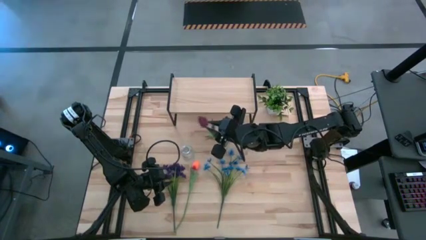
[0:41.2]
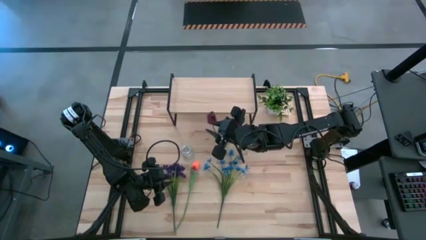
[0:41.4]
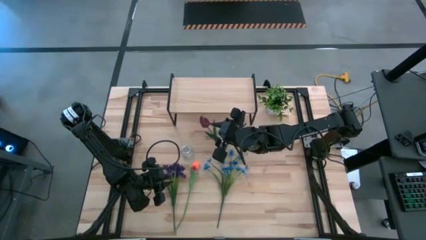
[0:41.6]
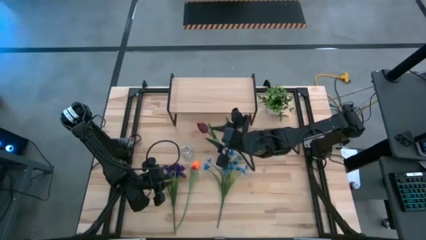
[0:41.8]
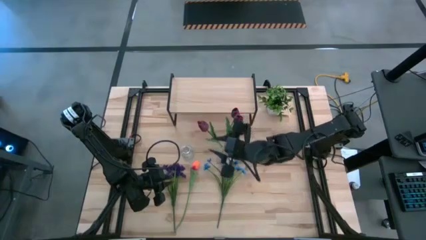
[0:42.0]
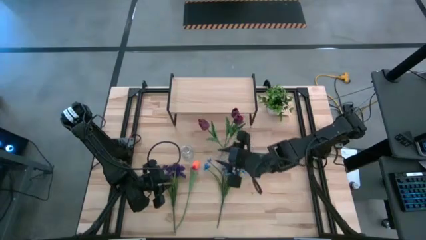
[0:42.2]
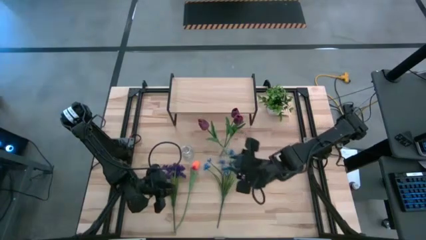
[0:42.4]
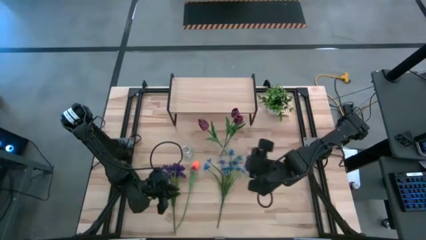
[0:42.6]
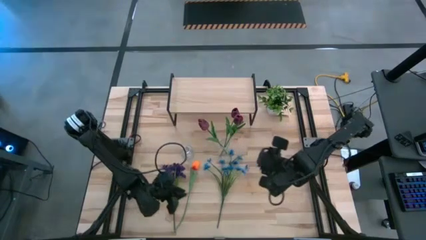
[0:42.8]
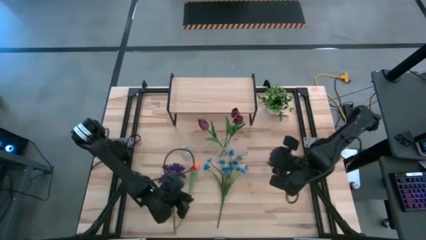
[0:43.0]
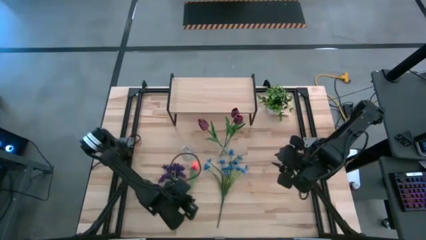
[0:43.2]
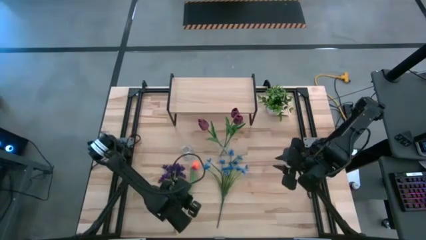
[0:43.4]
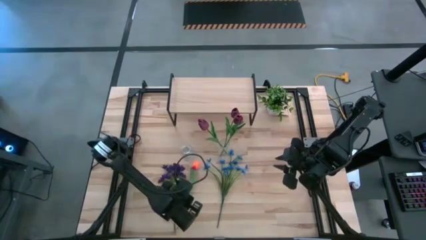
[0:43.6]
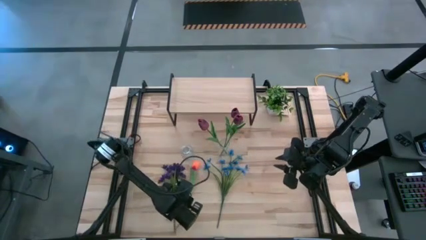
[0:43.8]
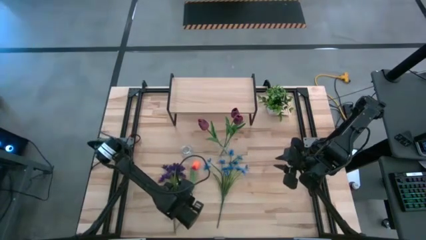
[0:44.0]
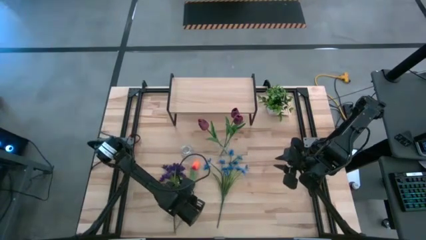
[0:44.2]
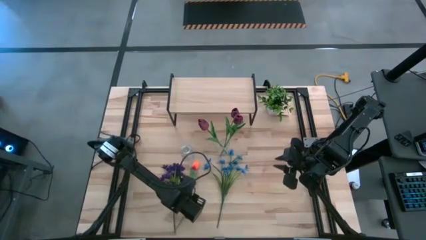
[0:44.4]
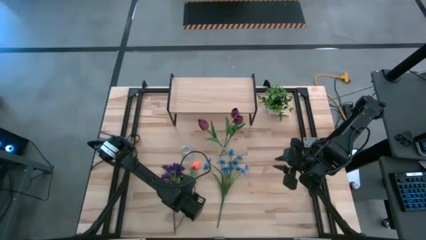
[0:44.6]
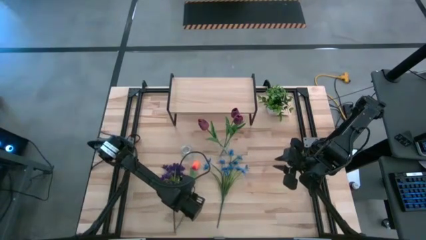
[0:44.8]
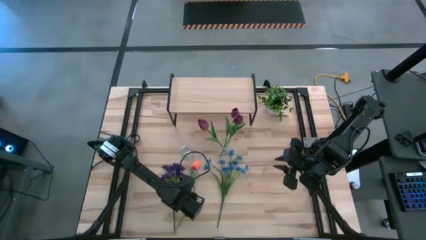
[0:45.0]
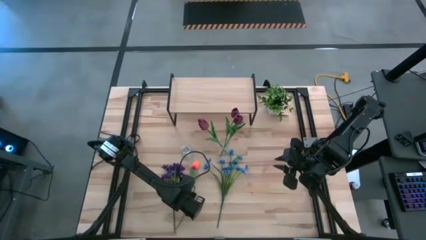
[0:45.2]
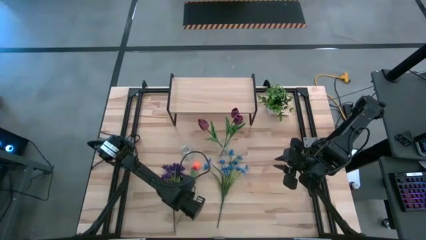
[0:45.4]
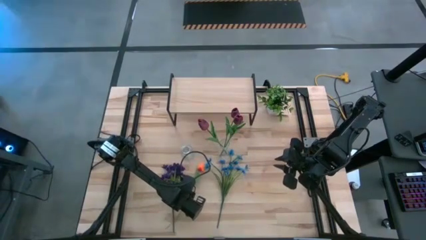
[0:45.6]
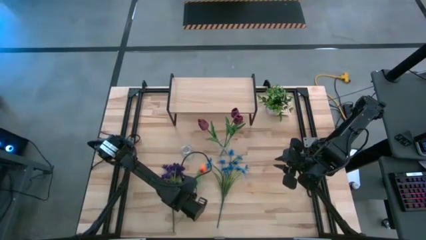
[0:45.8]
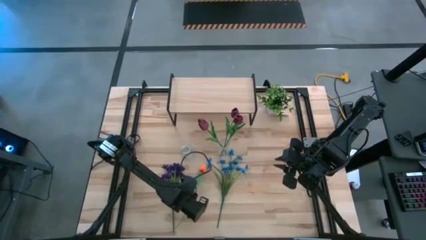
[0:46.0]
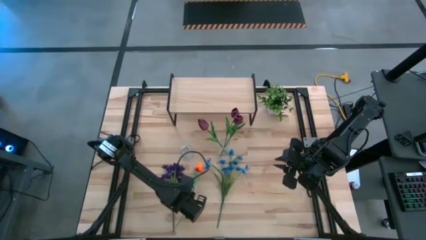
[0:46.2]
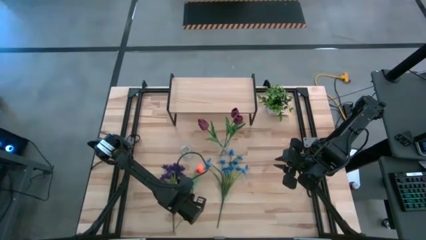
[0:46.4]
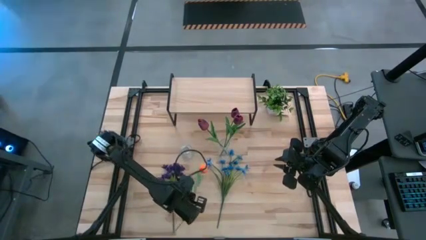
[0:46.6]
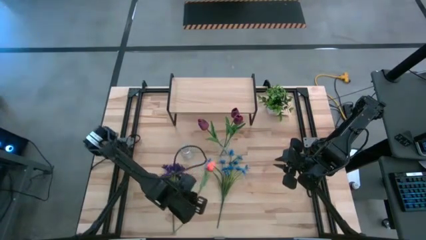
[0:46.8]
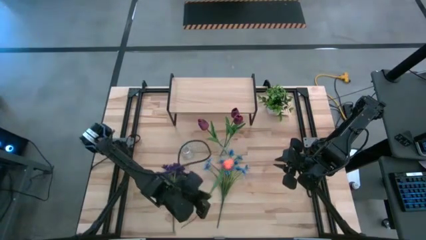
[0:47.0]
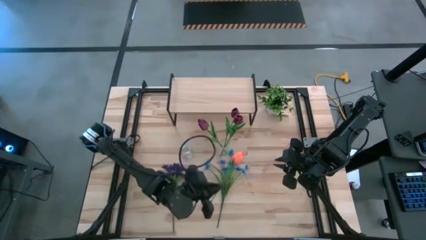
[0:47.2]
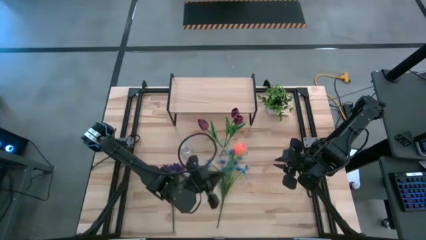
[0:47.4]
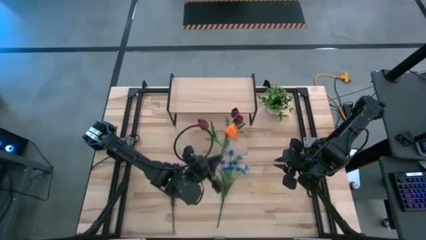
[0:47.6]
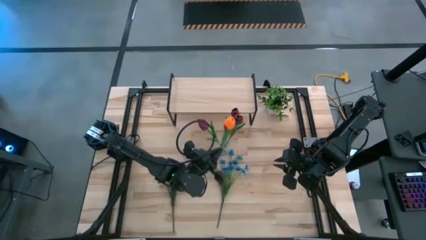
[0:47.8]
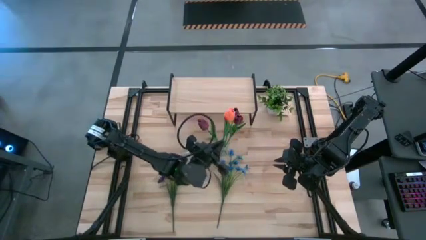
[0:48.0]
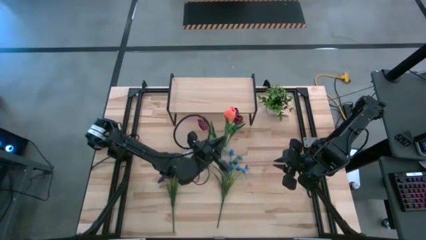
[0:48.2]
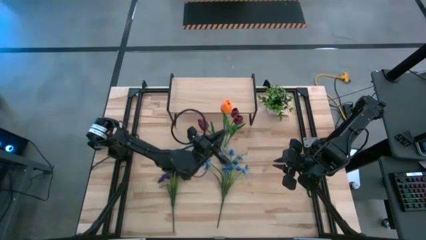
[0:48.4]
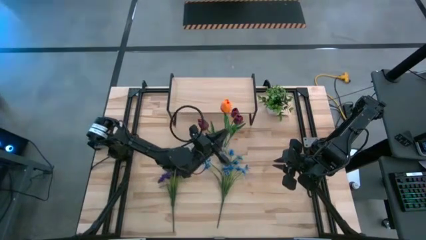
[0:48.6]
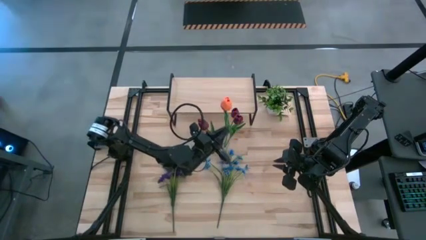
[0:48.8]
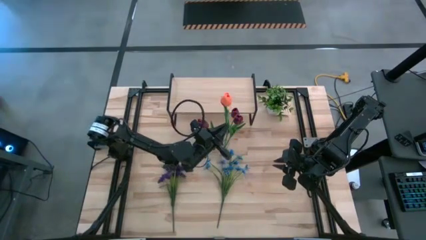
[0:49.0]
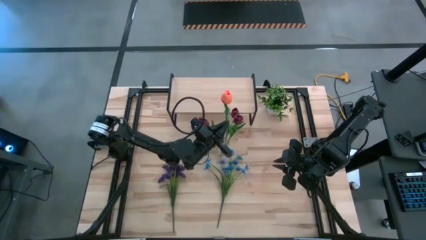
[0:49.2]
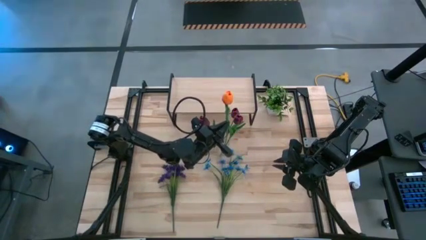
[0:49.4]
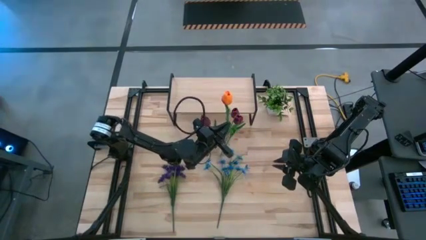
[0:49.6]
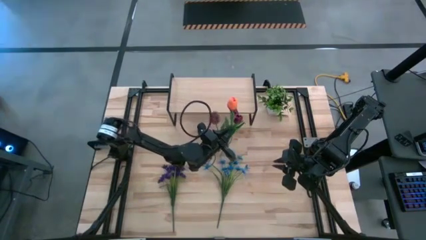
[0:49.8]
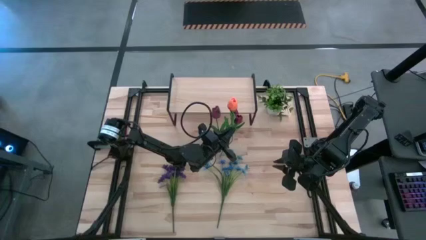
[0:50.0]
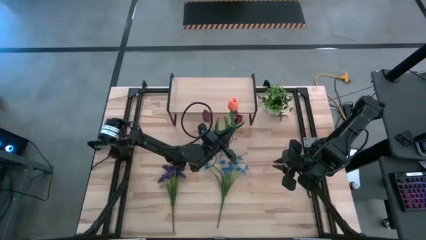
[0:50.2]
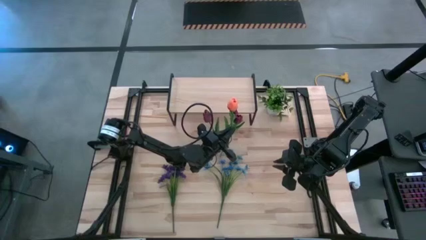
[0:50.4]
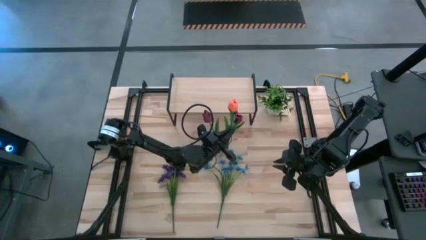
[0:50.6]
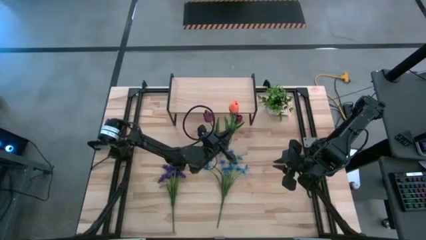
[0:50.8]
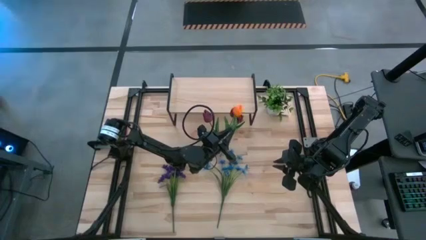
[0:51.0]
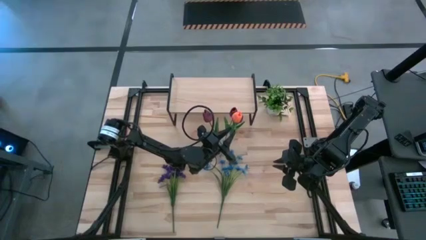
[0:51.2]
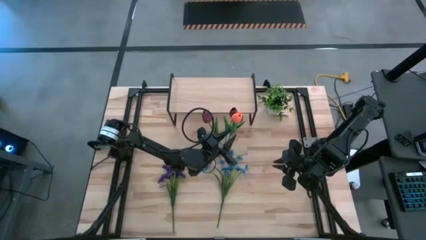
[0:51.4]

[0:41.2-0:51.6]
Task: Pick and place flowers into a vace then onto a shelf
Put the orange tulip into the right transparent vase

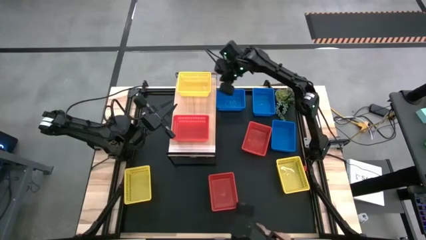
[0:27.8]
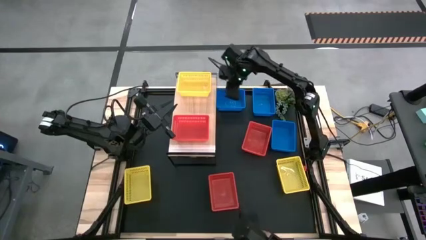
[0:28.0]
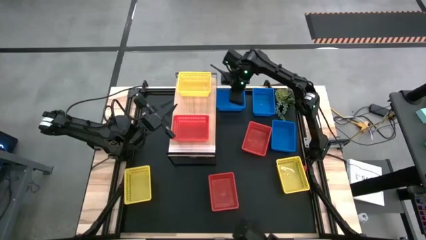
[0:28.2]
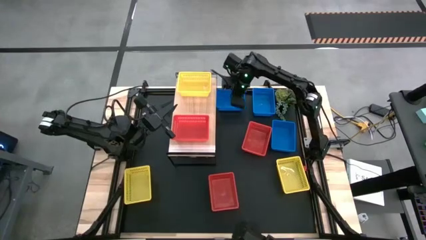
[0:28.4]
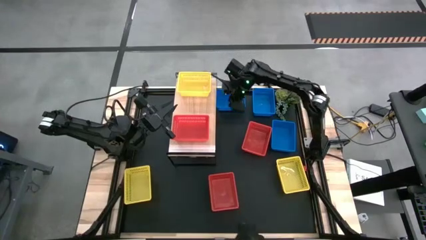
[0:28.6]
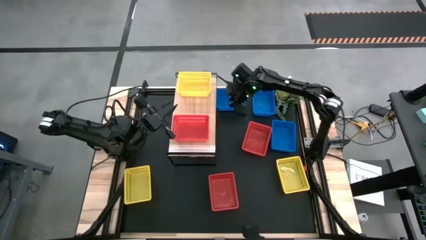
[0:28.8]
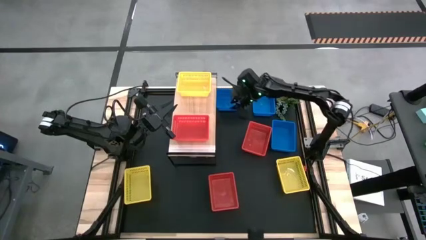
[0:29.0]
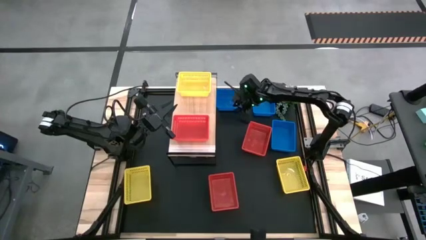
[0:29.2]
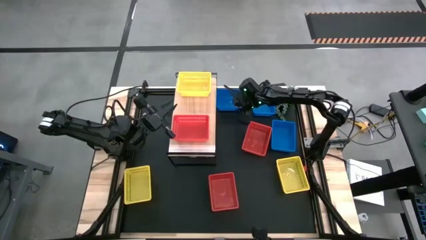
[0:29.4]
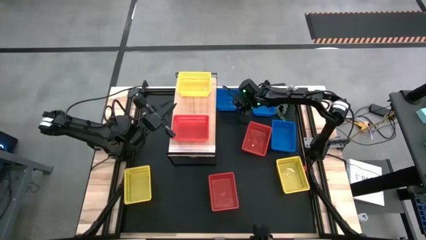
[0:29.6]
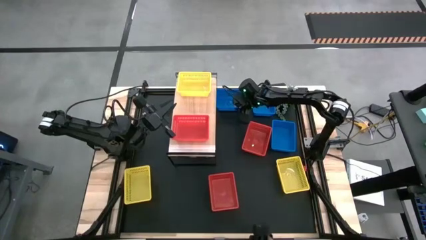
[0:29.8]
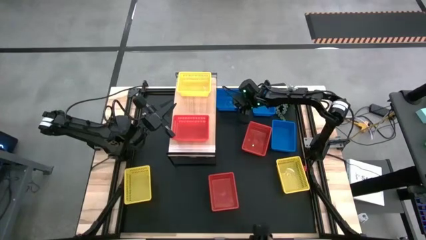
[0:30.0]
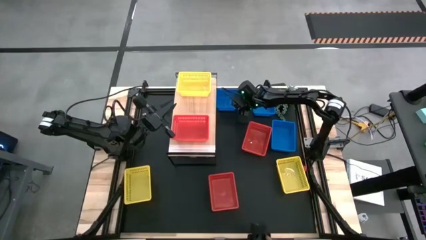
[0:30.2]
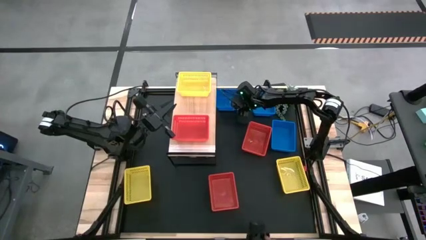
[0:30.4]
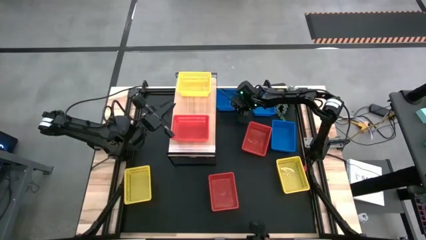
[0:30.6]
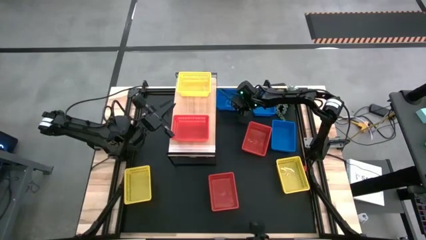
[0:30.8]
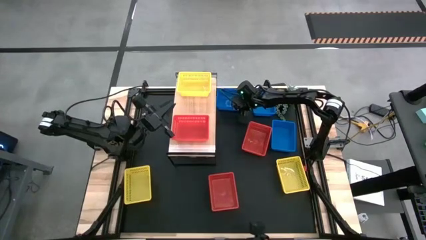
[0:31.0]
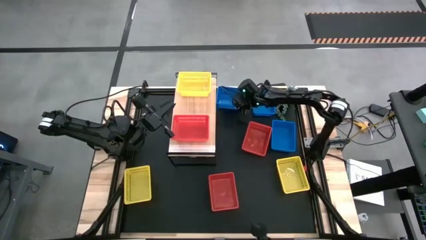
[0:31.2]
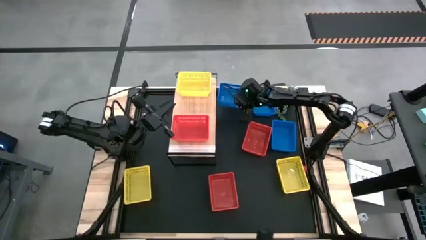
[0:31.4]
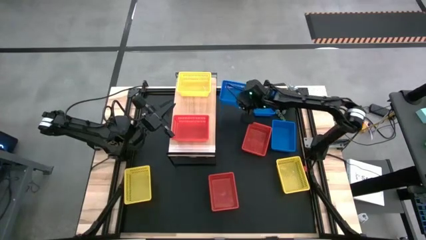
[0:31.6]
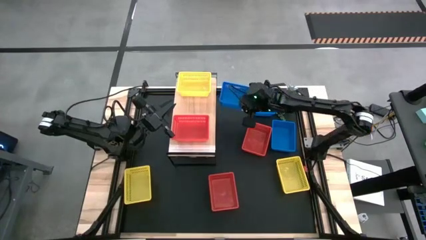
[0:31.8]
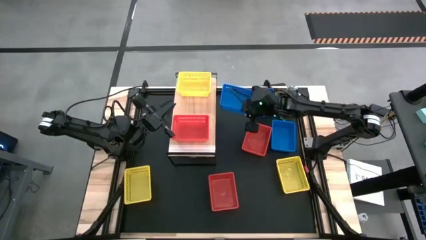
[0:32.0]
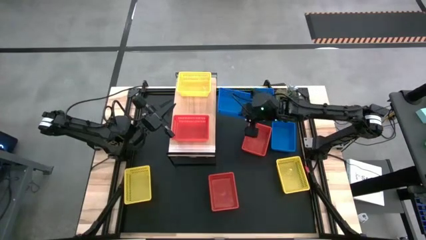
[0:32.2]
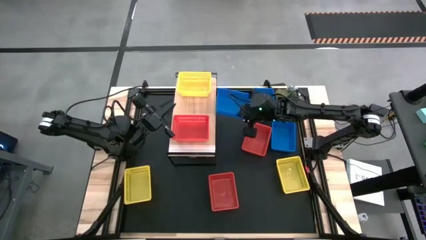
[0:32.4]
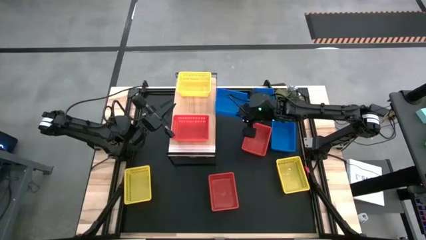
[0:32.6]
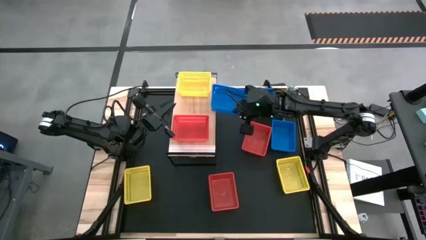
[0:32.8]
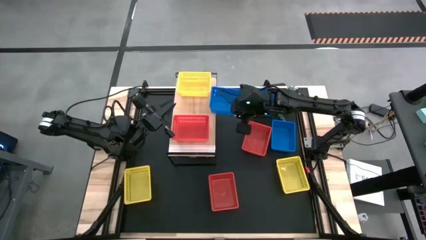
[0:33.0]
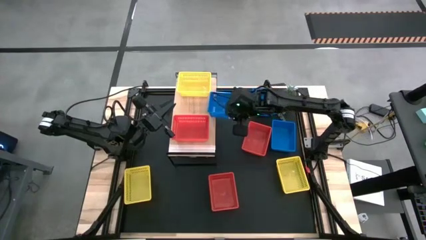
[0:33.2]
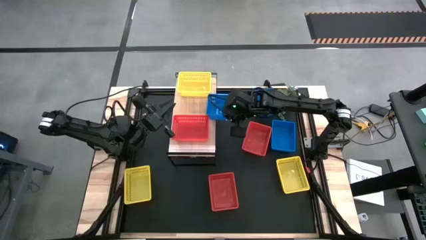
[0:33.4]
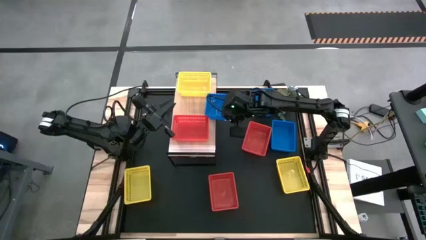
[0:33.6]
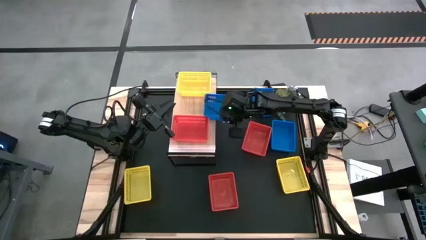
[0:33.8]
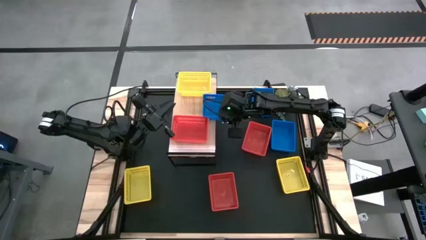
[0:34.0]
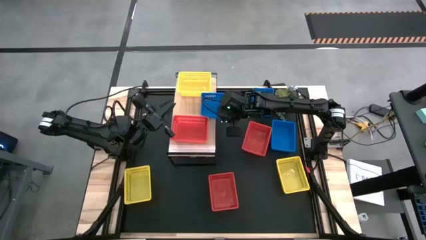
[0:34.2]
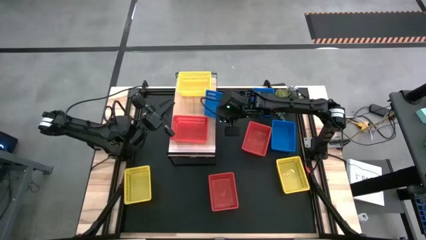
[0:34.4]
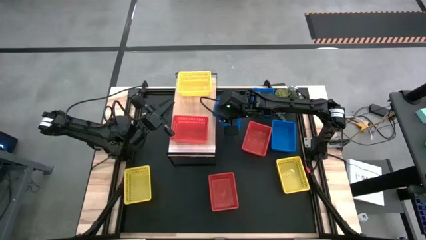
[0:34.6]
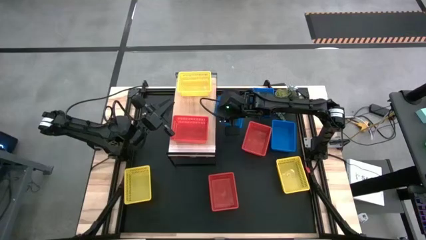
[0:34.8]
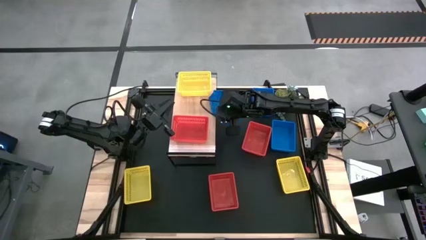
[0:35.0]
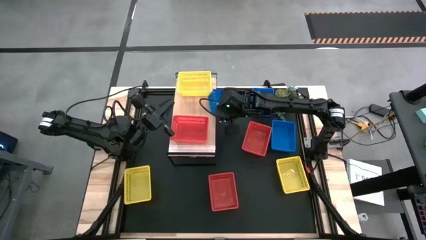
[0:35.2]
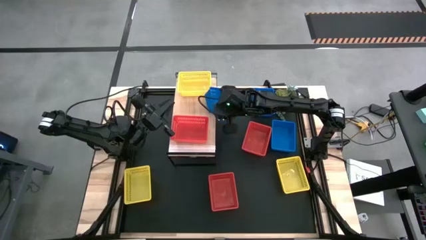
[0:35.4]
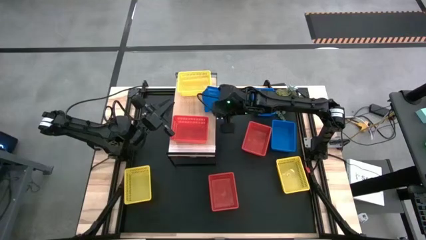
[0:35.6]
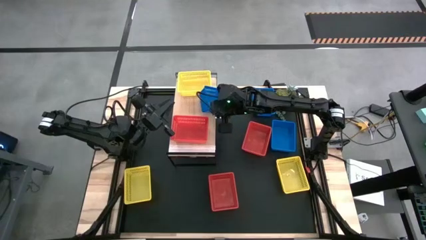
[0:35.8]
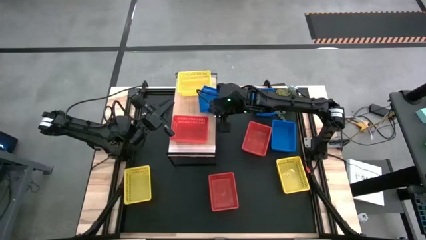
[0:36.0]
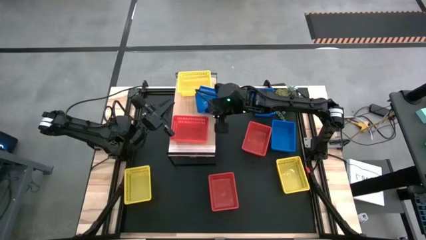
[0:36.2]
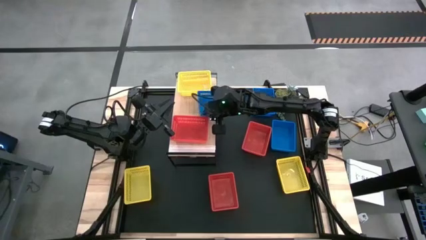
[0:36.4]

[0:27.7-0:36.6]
Task: Stack baskets on shelf by color
Put the top left blue bin on the shelf
